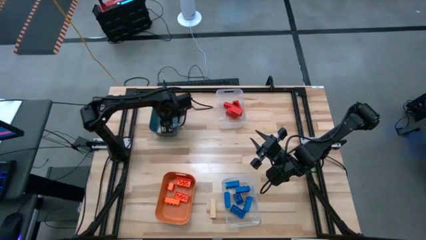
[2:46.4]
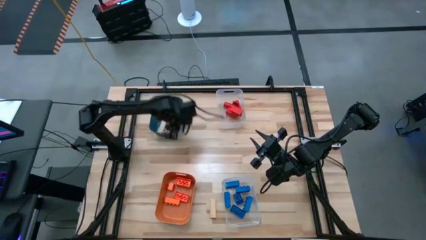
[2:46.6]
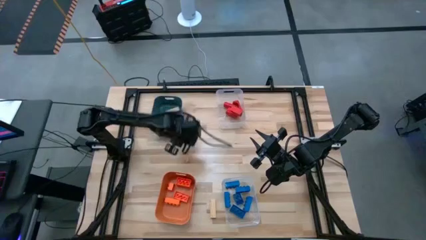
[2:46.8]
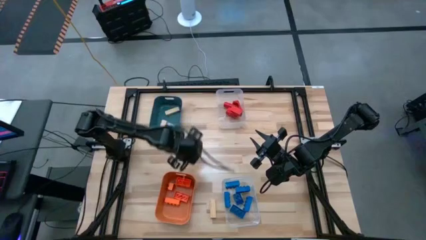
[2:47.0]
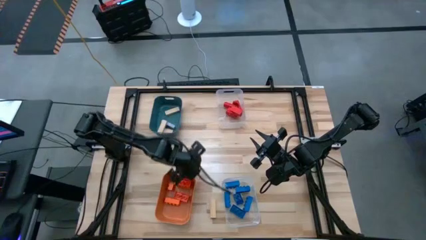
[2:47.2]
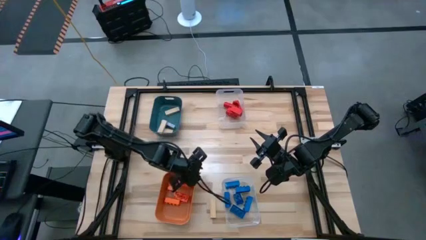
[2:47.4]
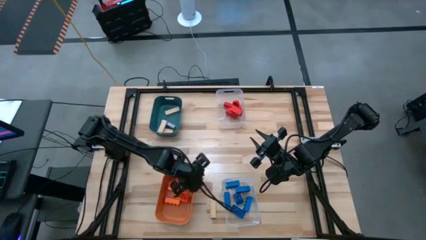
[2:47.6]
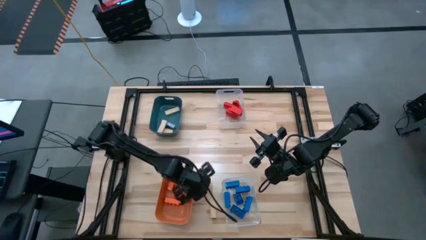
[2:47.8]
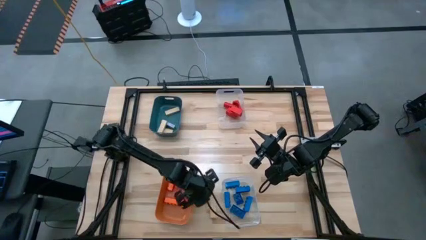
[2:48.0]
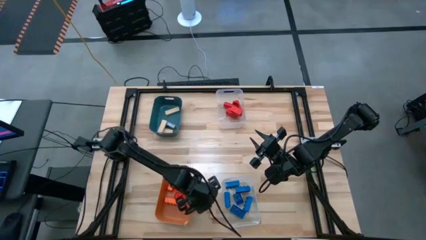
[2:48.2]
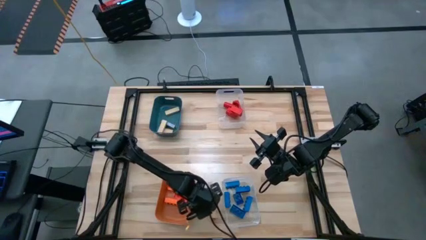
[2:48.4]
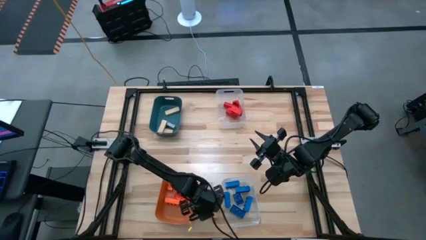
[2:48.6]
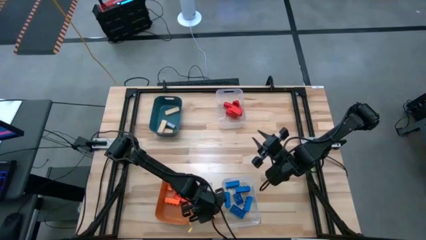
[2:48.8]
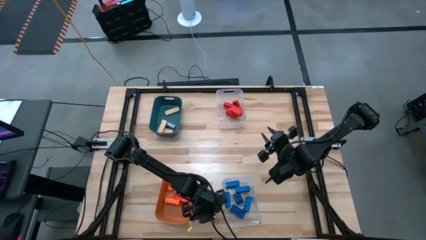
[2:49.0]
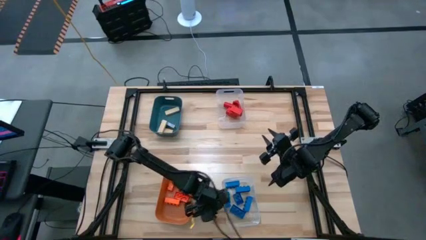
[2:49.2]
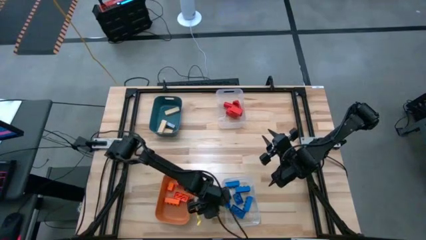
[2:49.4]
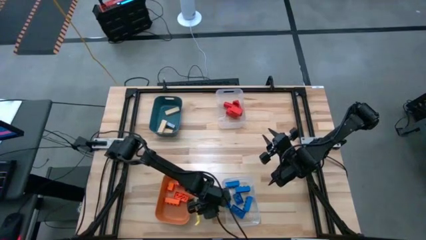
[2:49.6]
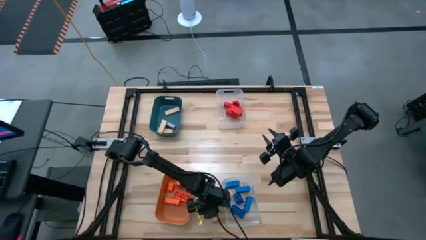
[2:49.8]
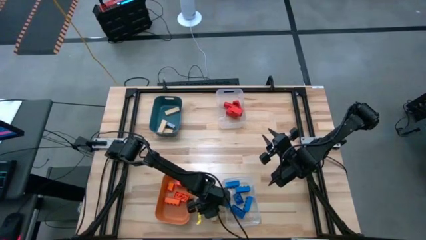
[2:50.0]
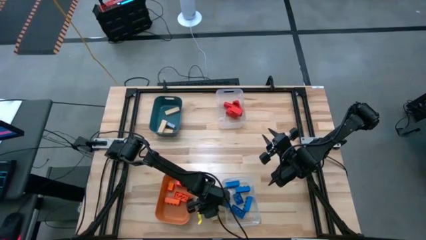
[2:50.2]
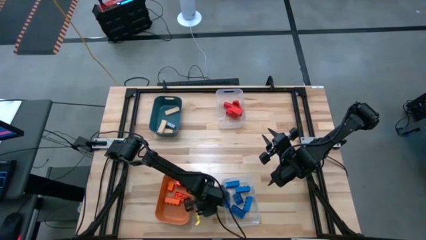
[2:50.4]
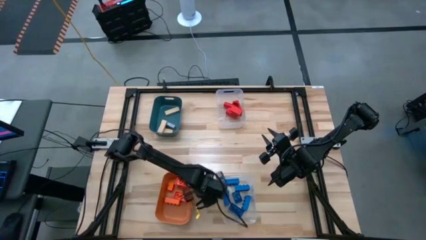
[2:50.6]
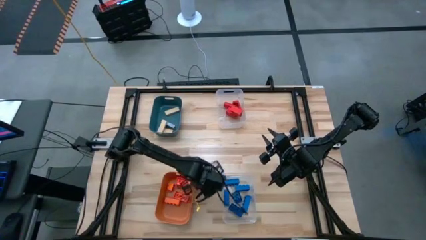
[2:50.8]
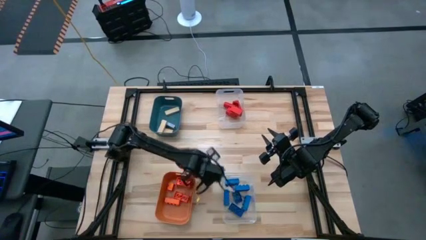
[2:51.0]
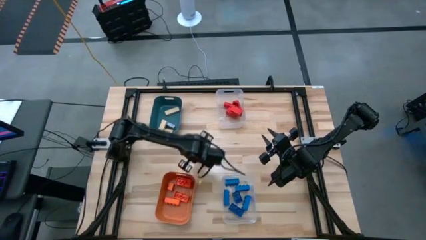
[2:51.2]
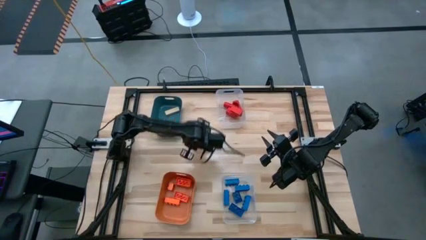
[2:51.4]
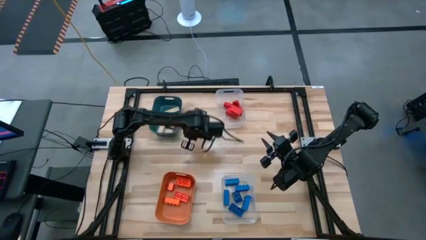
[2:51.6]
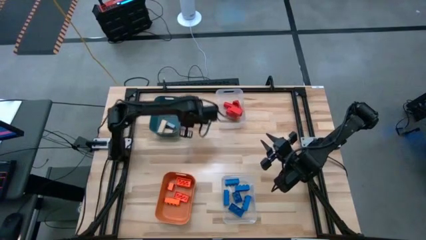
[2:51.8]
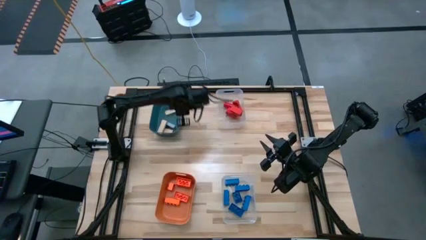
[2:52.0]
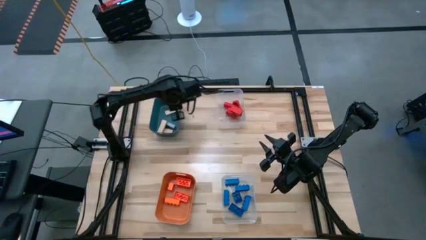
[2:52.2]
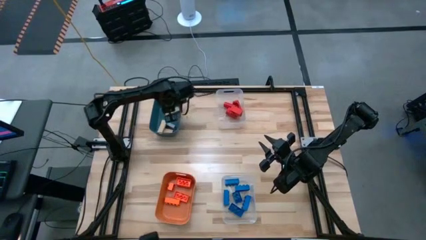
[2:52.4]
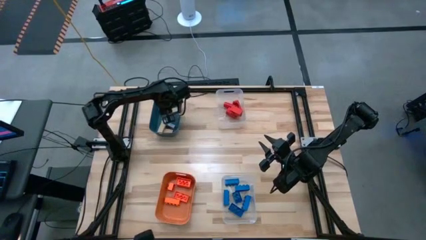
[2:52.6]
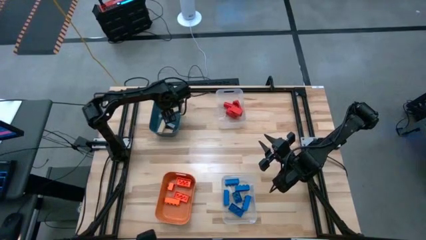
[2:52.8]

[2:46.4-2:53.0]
Task: Sort blocks
Put the brown wooden block into the blue bin

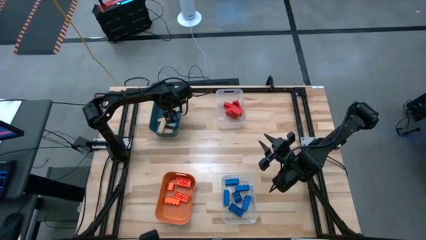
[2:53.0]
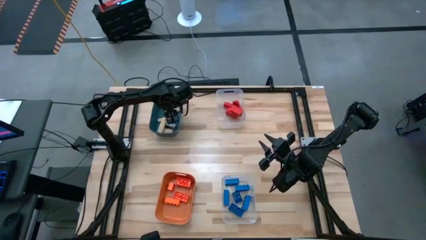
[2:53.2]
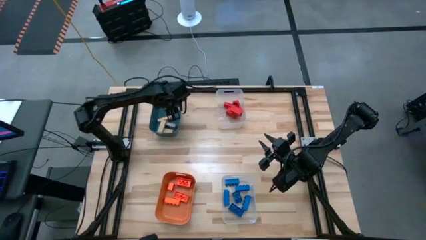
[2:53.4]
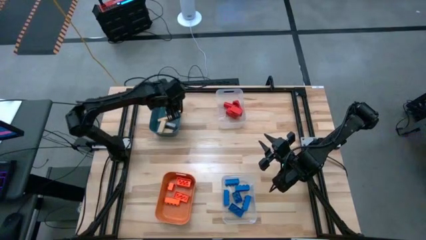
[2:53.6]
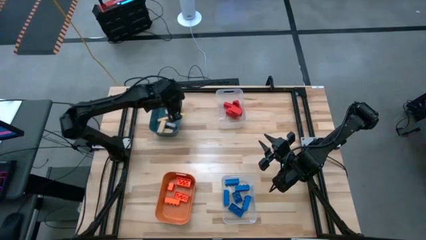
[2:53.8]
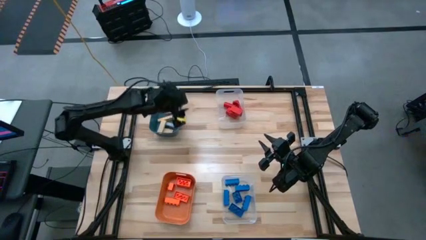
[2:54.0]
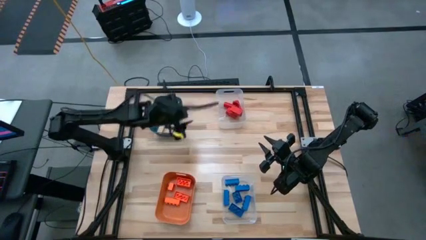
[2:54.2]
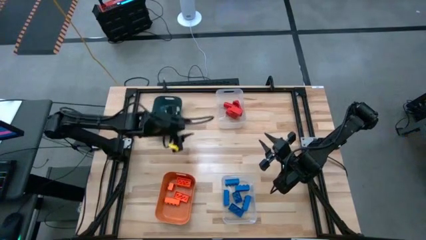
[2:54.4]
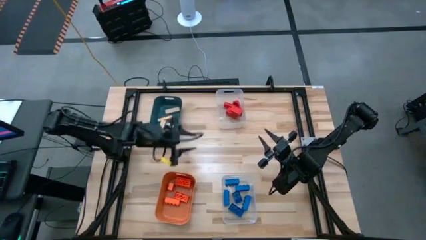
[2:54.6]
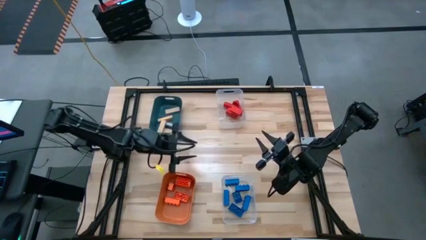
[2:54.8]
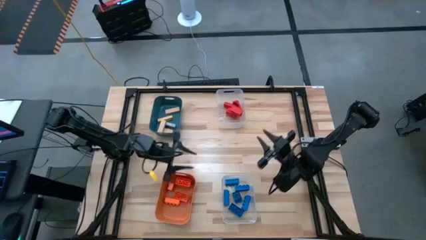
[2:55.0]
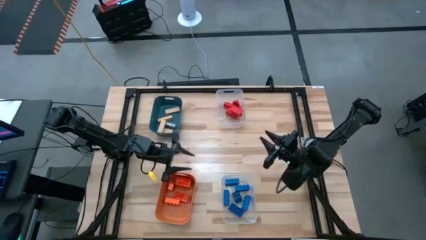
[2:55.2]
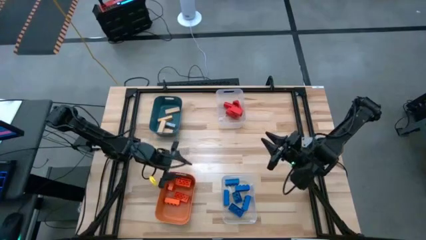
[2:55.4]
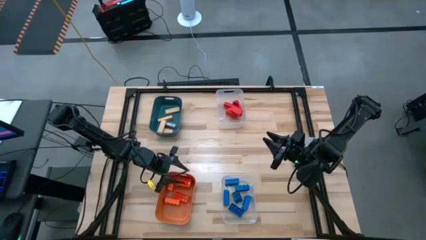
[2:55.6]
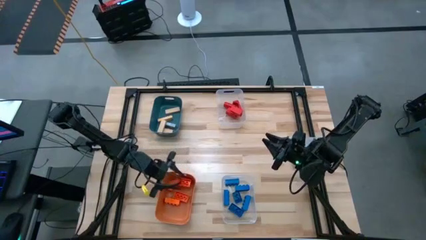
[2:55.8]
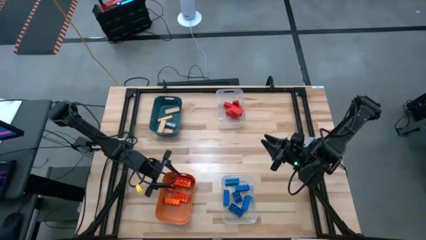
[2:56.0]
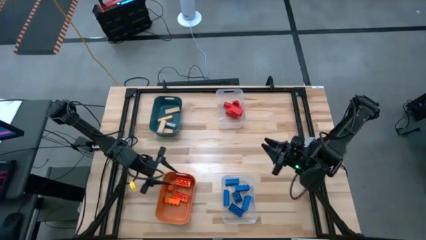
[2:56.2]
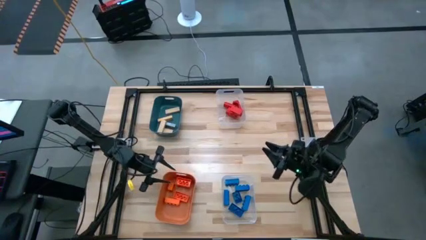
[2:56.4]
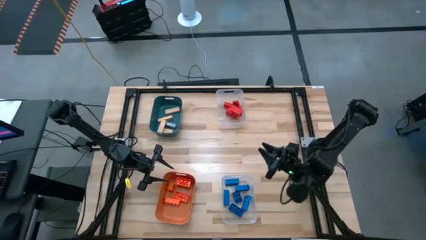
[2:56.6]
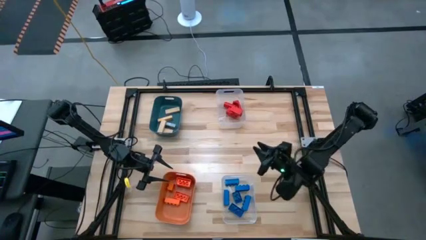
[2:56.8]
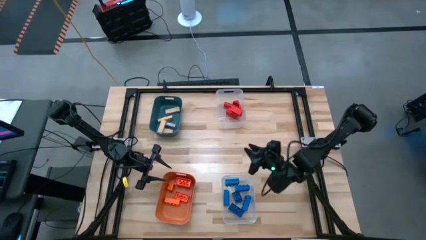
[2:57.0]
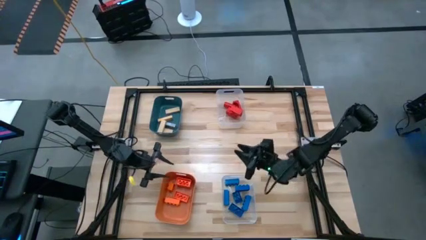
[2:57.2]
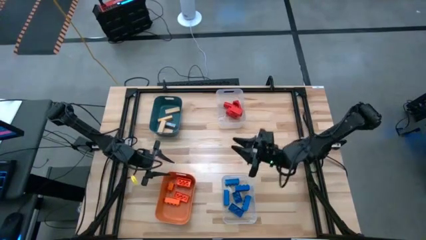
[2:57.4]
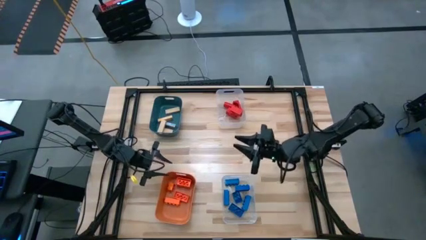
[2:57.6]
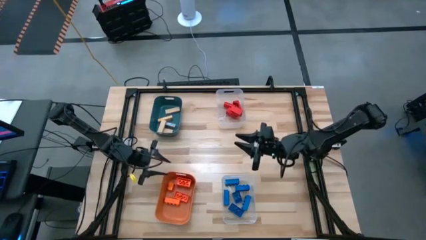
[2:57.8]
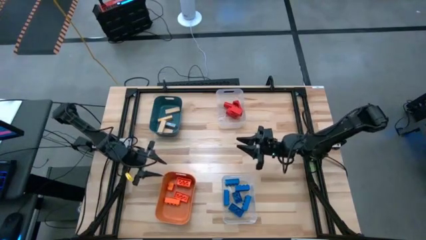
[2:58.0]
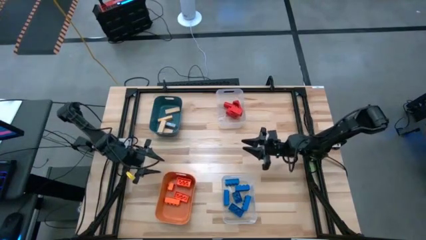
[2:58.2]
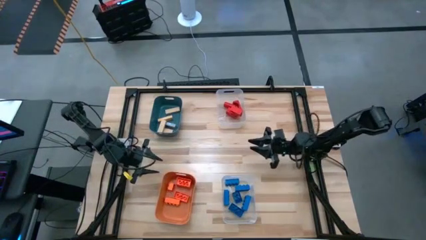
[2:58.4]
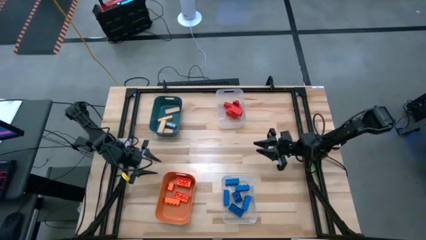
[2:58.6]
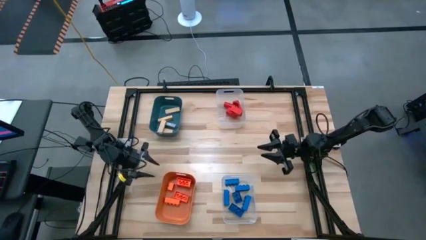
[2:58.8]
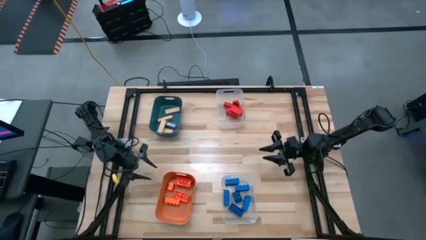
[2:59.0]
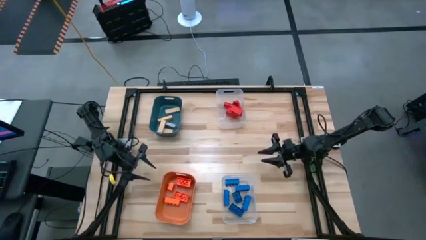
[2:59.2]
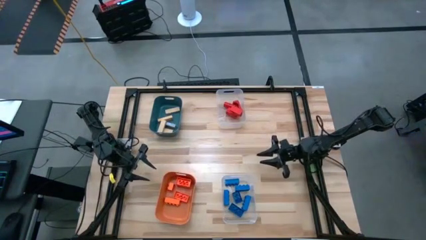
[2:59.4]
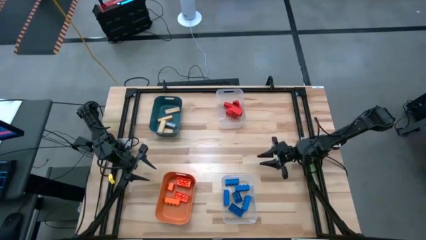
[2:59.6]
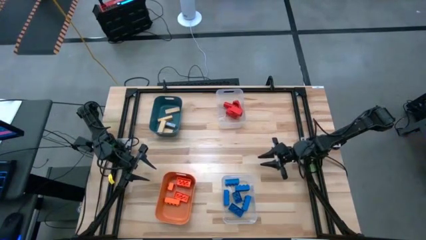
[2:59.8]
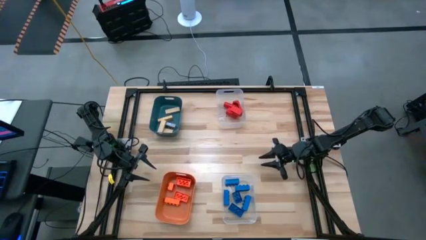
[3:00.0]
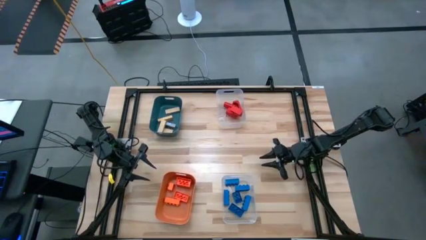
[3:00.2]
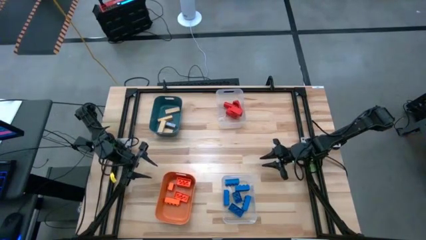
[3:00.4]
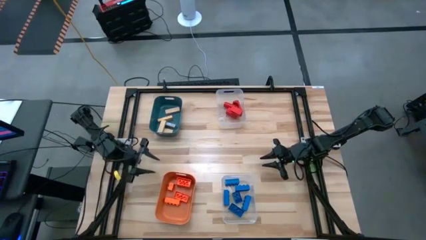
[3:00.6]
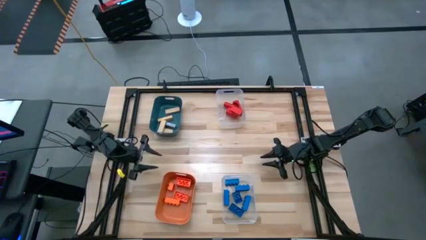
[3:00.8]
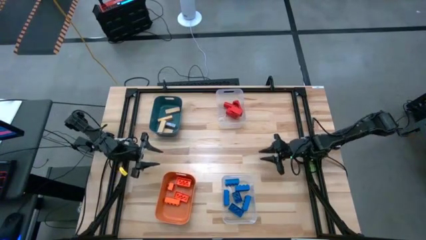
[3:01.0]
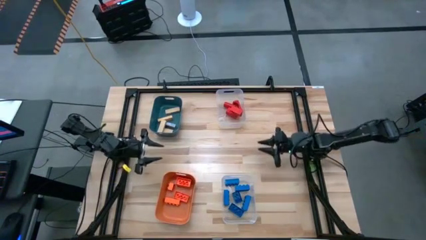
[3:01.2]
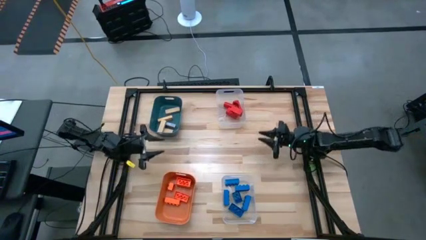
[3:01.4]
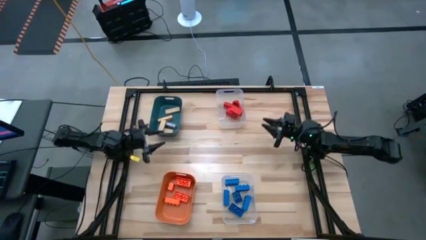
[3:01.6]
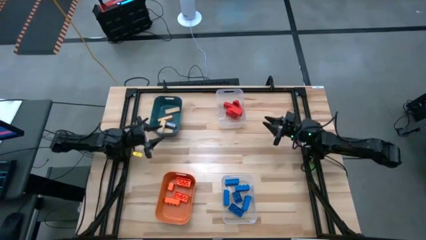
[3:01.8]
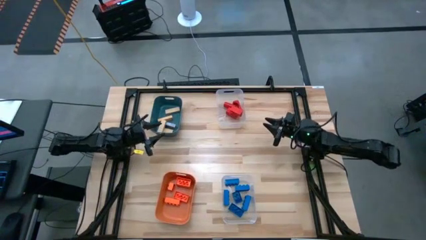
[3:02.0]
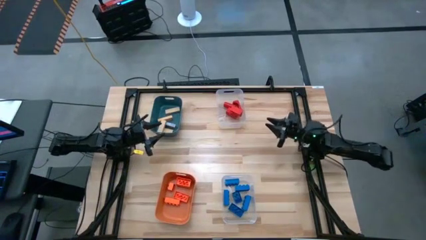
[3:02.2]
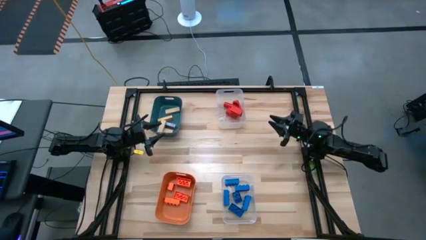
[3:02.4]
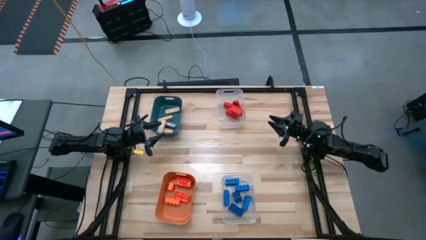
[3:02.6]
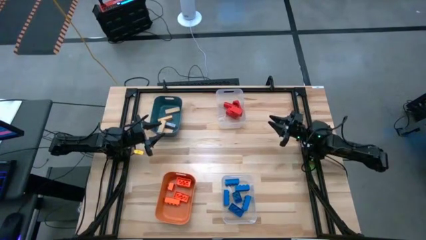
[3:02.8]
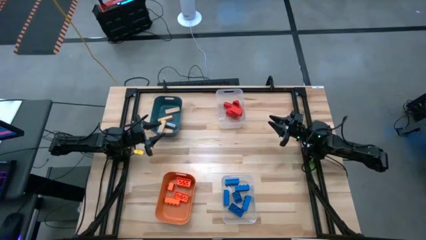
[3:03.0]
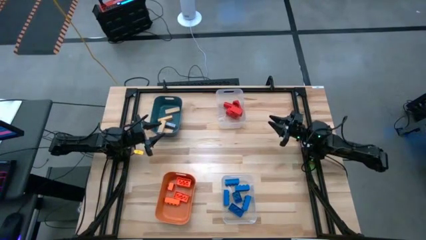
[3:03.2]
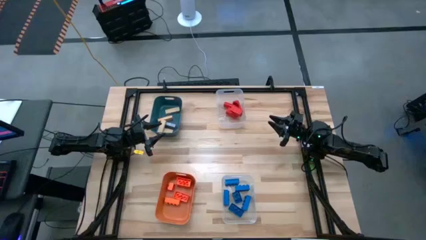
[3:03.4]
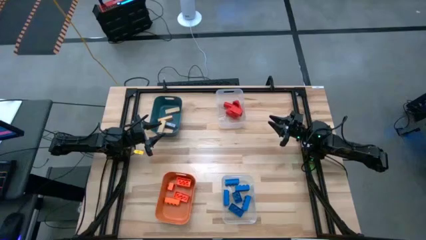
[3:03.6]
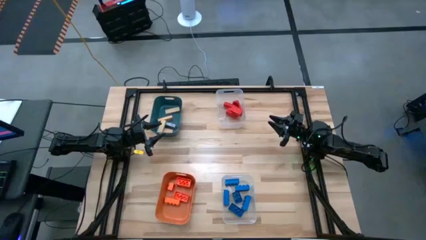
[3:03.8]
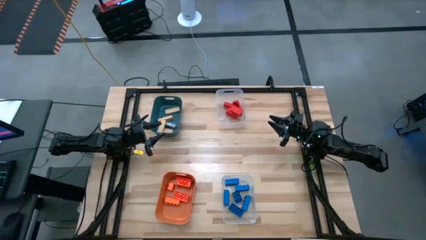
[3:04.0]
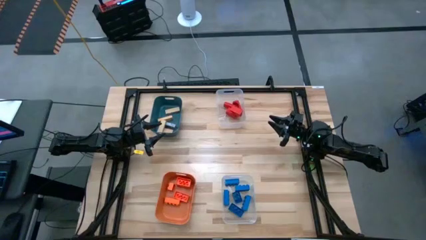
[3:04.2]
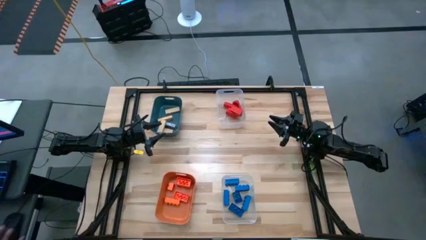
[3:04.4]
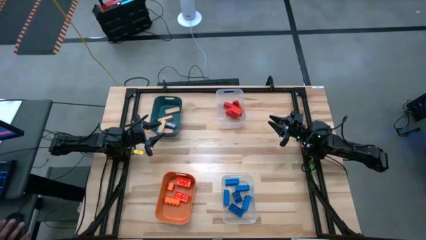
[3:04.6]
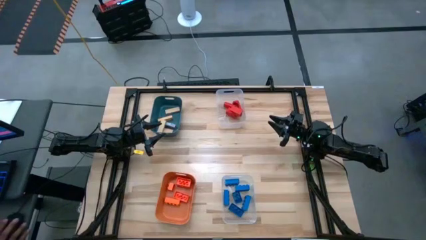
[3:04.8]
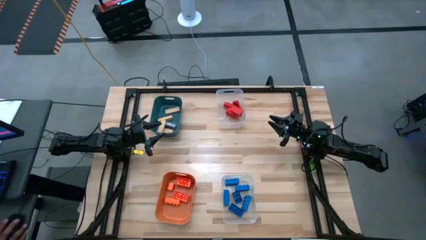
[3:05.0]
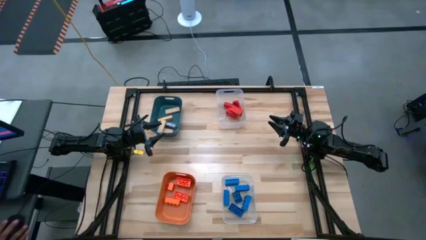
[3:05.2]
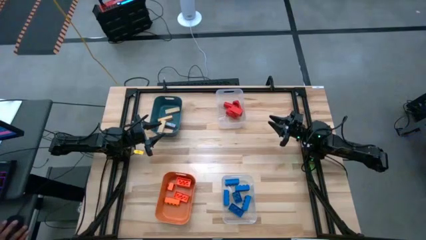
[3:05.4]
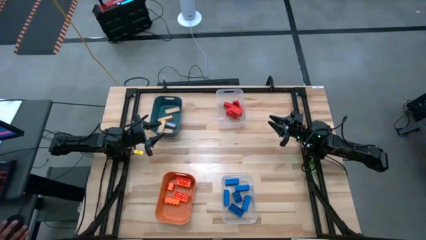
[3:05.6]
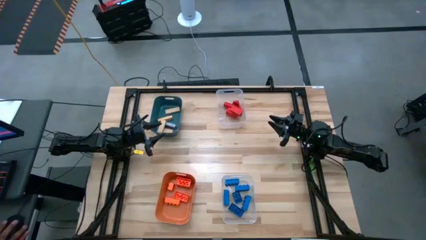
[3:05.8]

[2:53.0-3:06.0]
Return to Home Position
